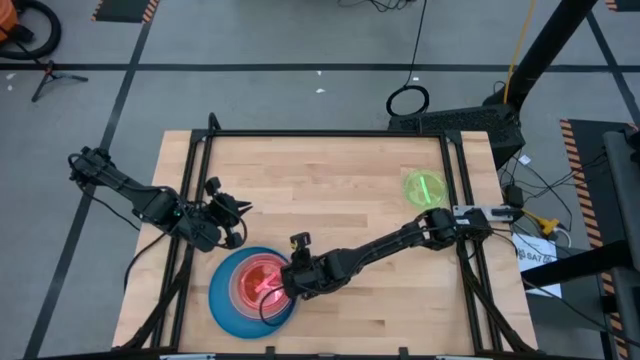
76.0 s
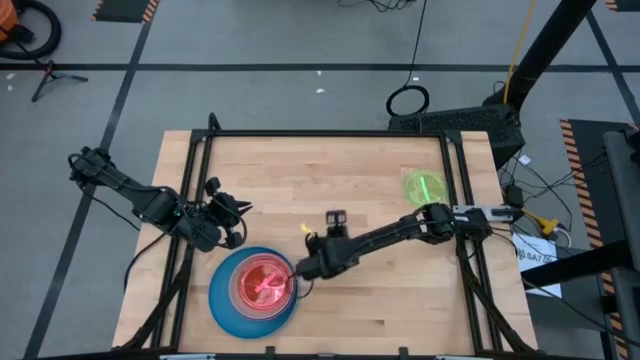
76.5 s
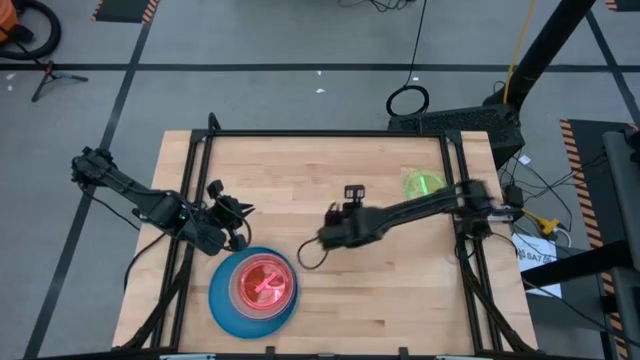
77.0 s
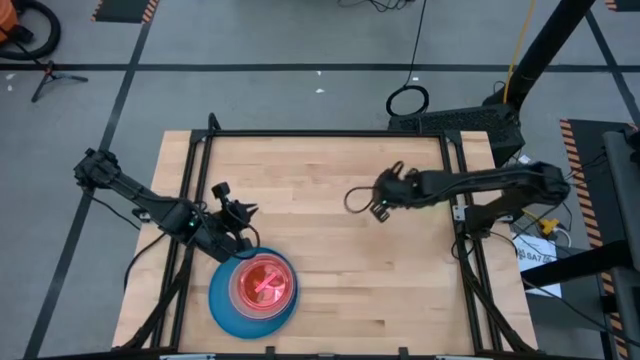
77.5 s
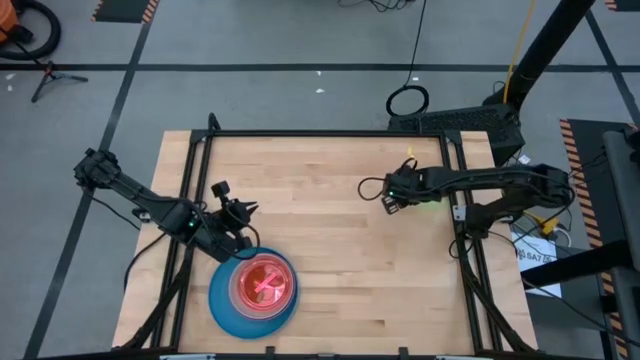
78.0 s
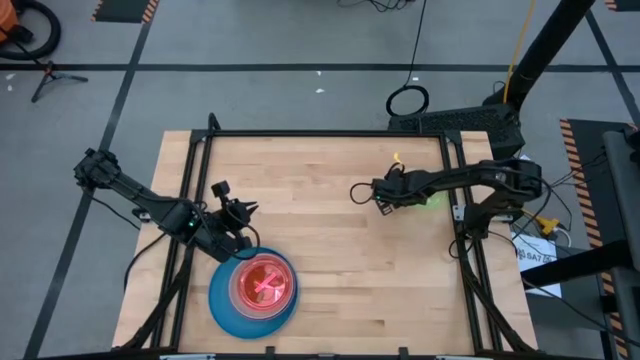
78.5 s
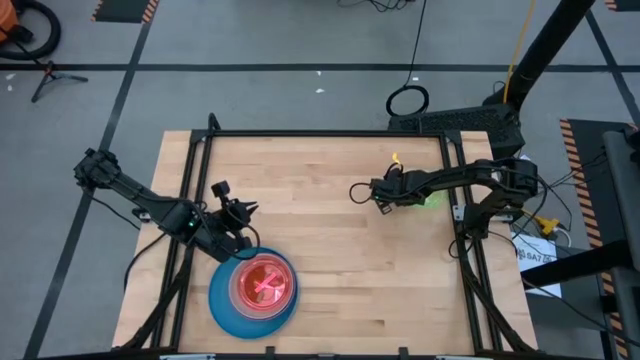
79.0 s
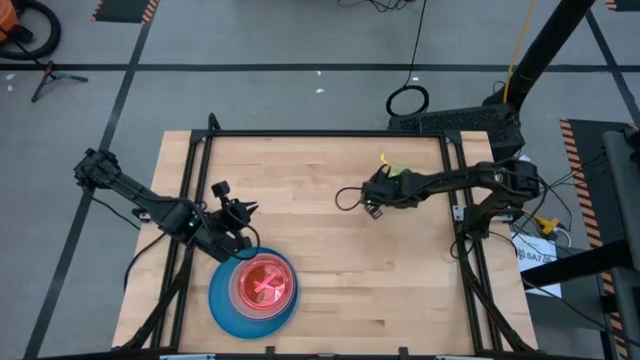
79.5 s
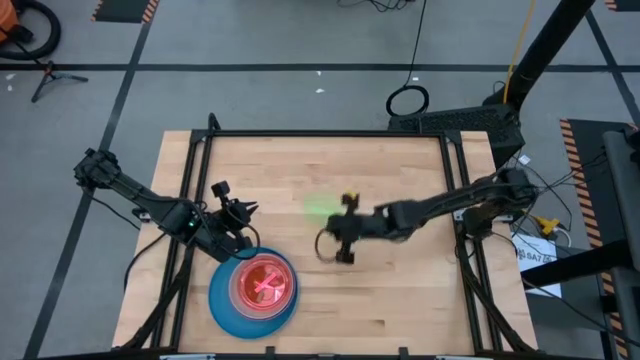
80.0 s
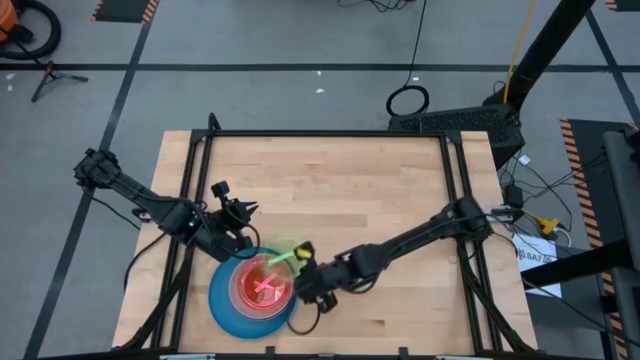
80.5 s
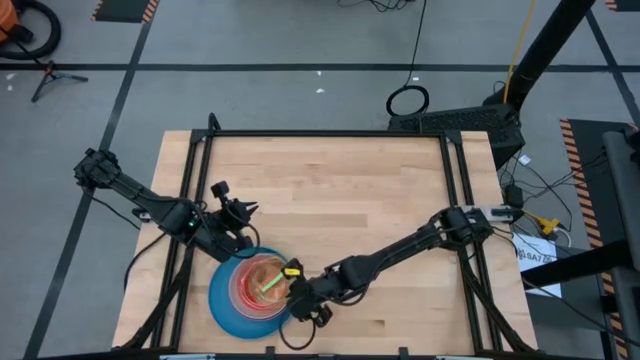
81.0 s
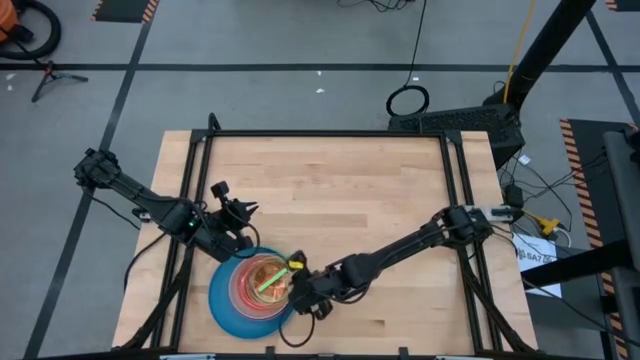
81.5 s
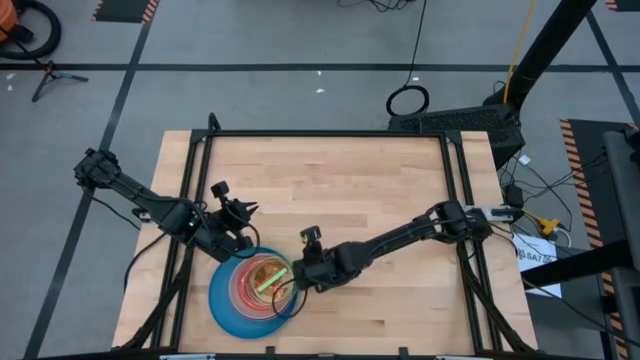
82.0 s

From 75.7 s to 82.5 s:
Task: Stack plastic plates
Stack the green plate on the pink plate

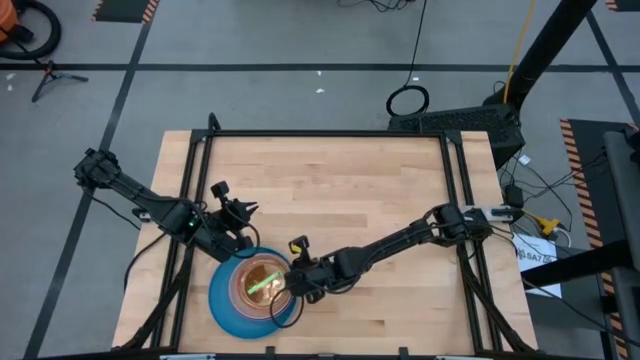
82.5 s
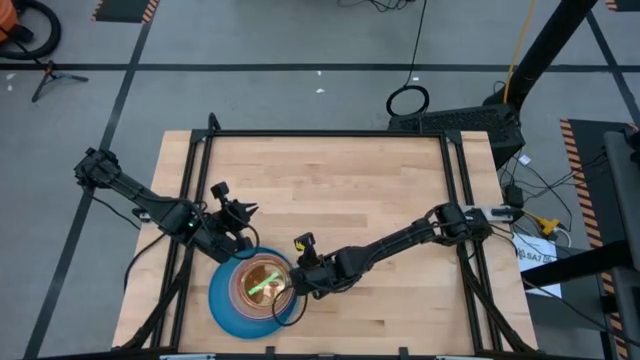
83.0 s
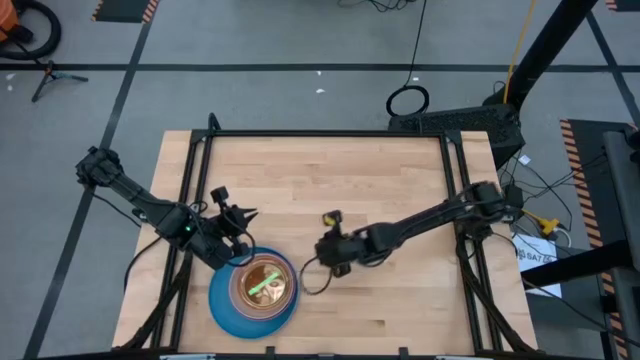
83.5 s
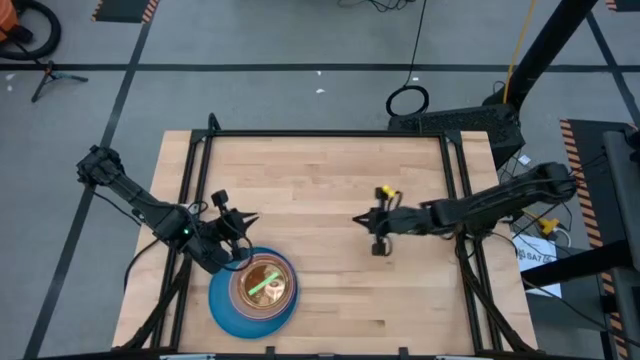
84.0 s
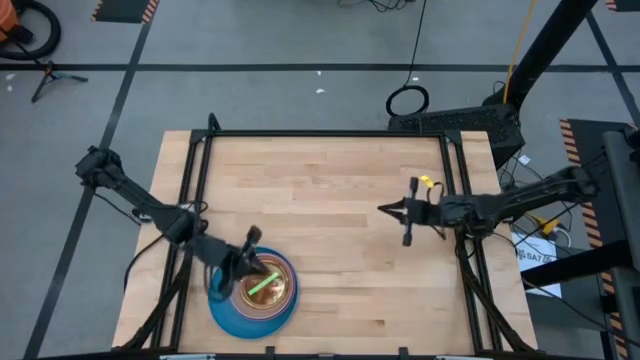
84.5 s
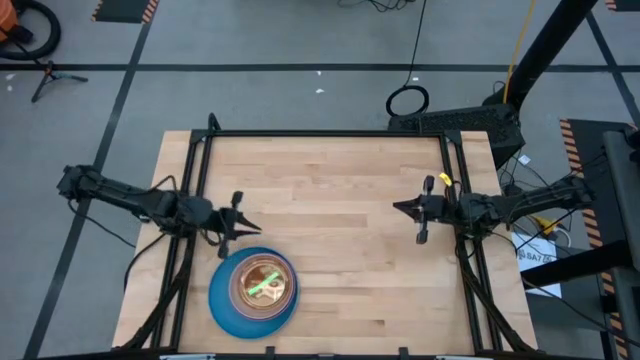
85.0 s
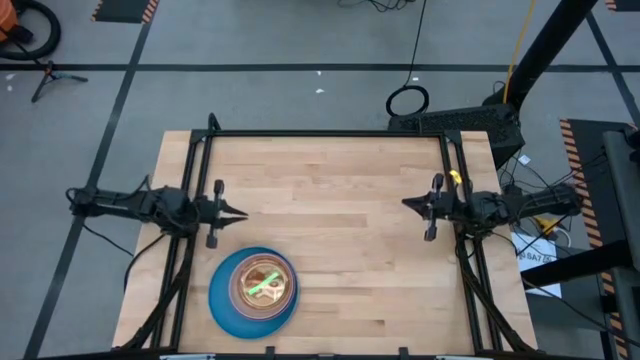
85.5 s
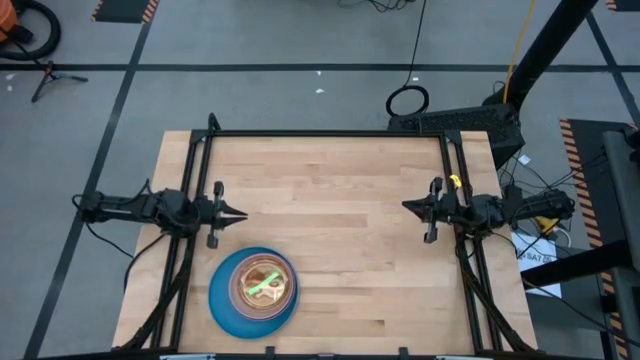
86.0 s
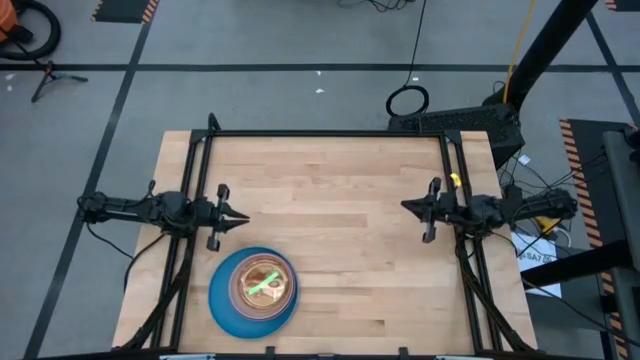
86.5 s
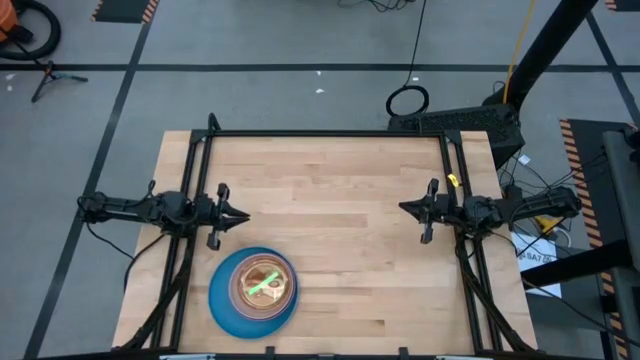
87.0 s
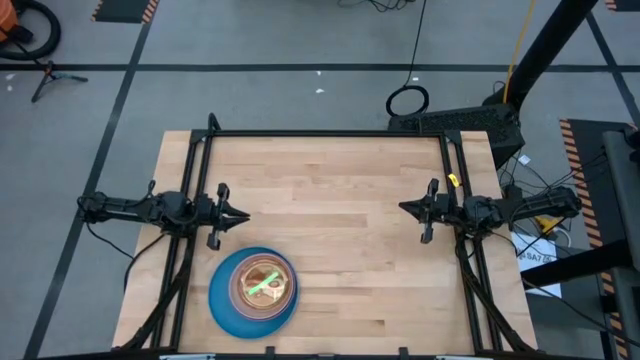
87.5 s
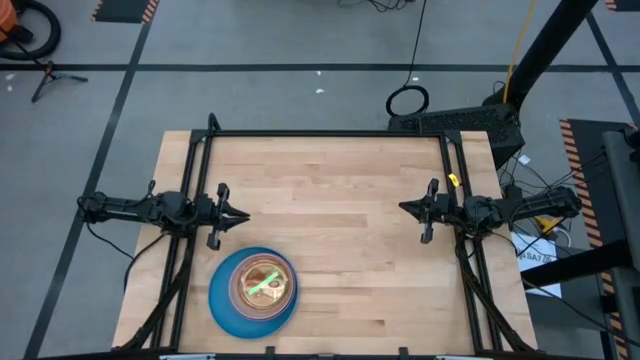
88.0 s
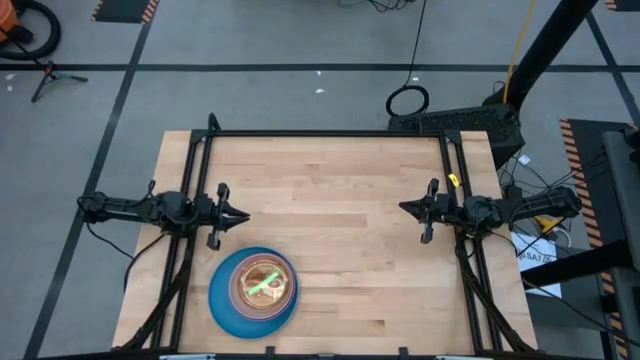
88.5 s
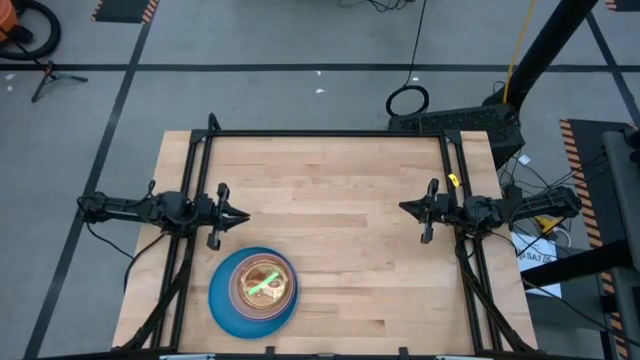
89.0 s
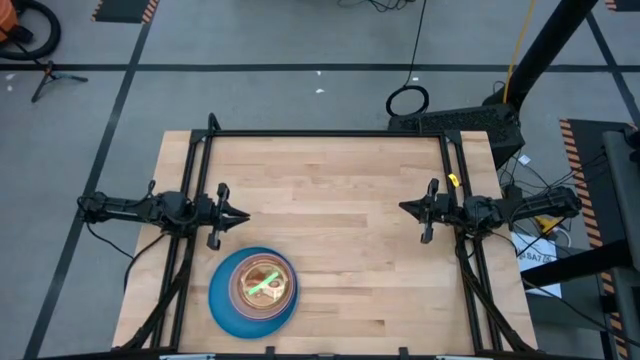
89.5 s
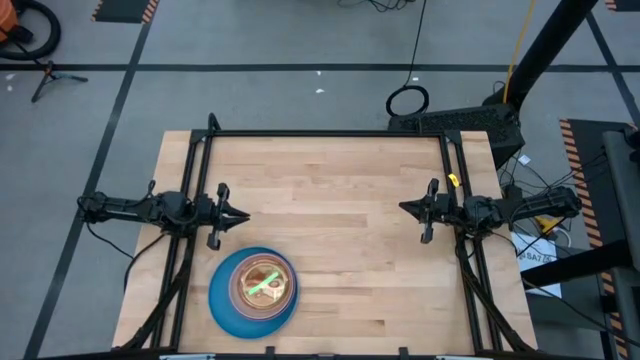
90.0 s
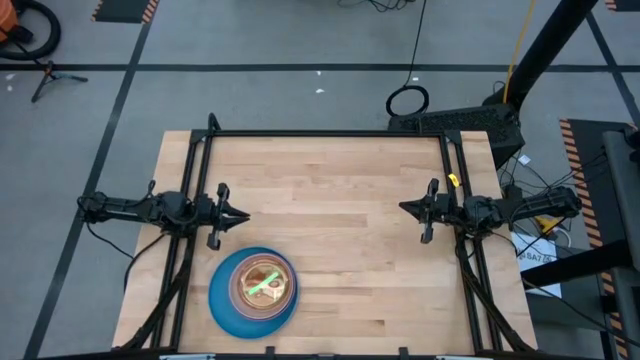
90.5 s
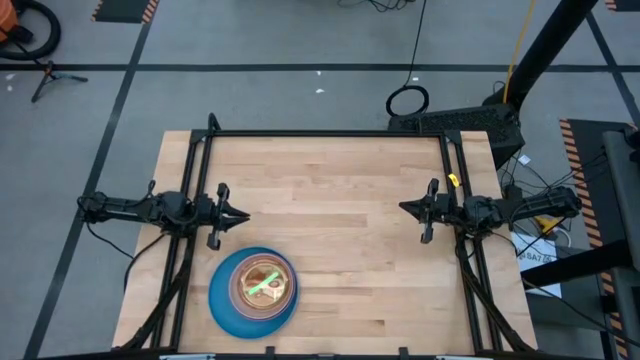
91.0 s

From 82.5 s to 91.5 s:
Return to Home Position

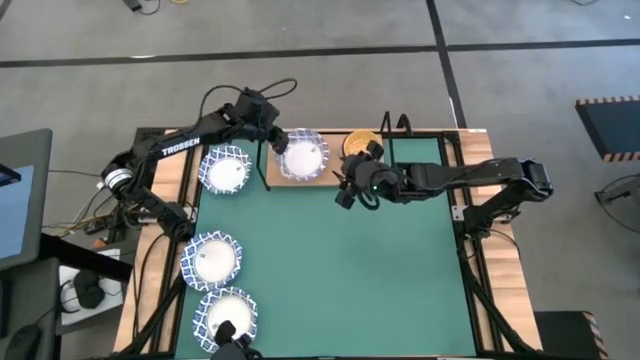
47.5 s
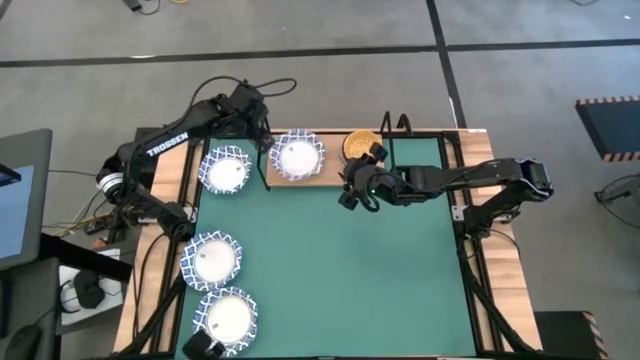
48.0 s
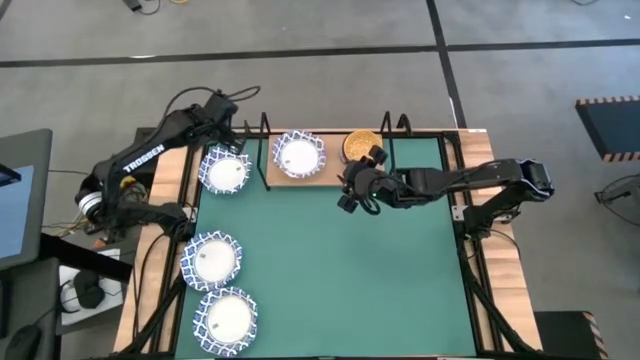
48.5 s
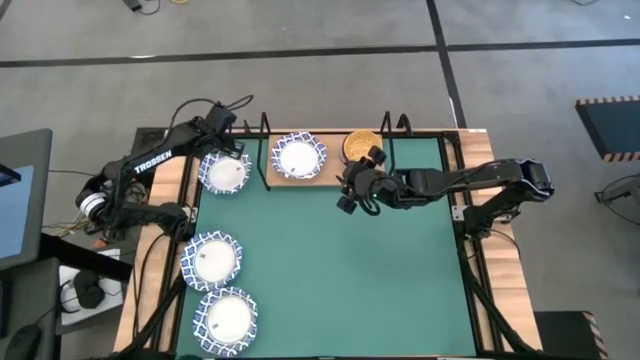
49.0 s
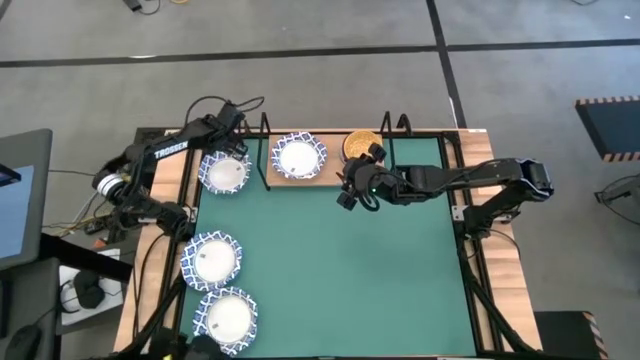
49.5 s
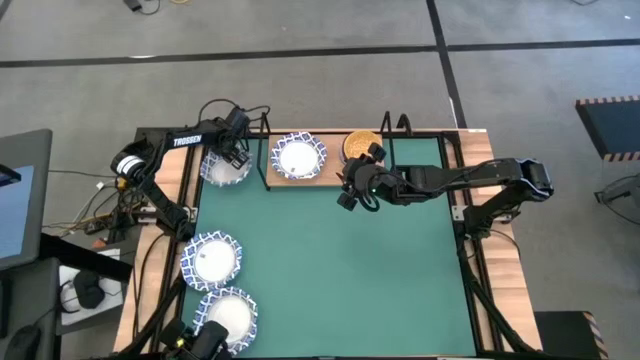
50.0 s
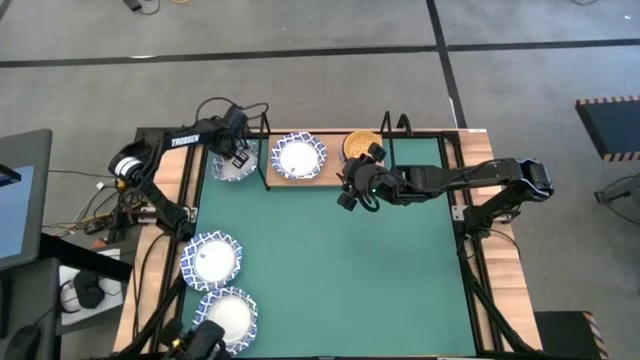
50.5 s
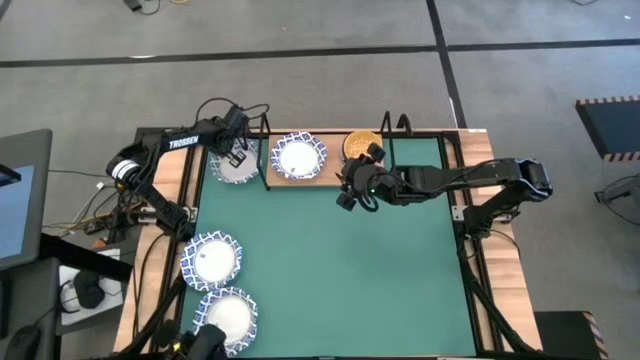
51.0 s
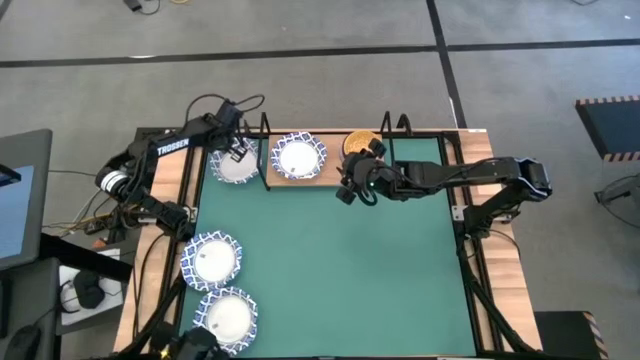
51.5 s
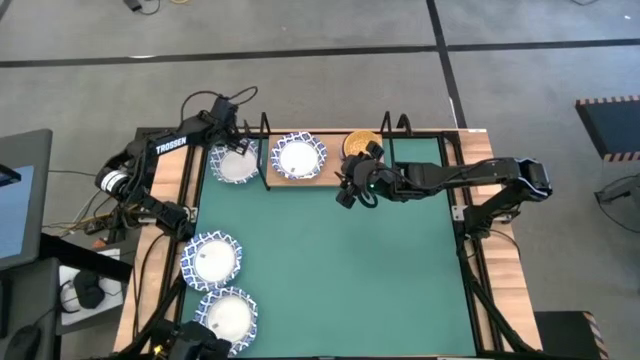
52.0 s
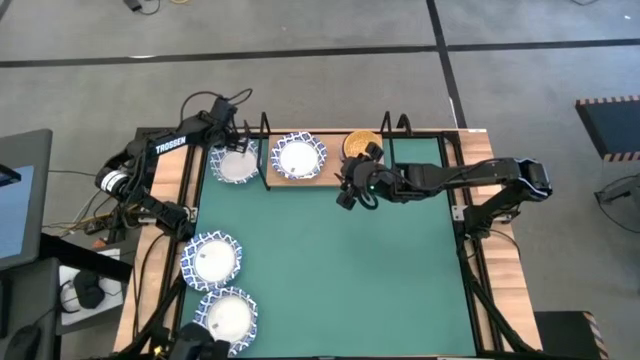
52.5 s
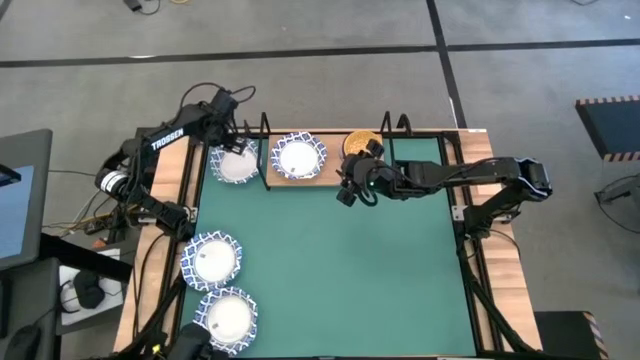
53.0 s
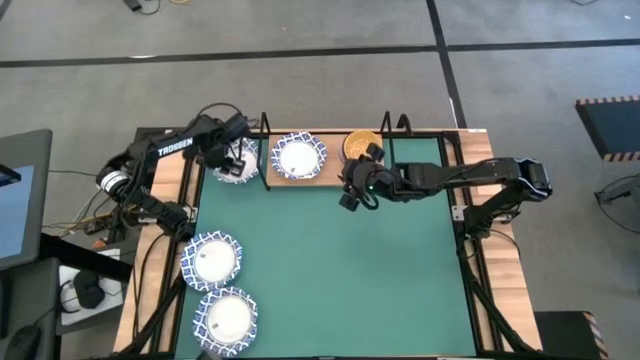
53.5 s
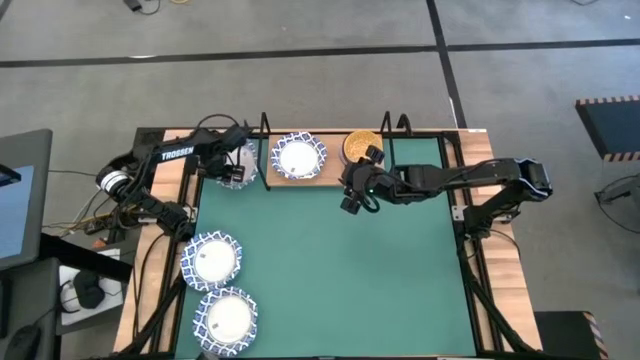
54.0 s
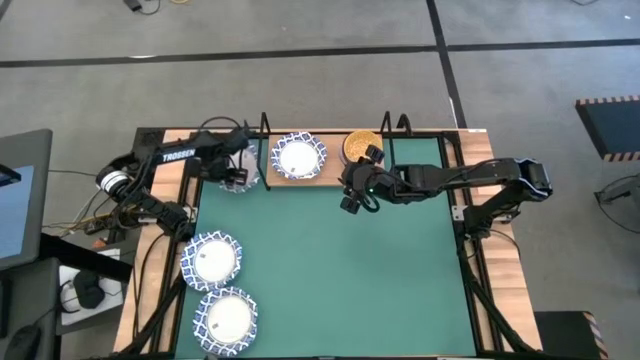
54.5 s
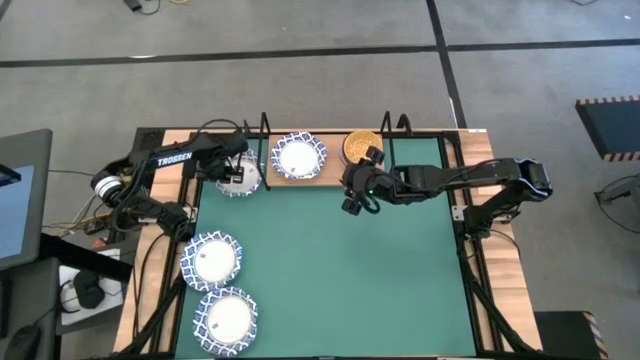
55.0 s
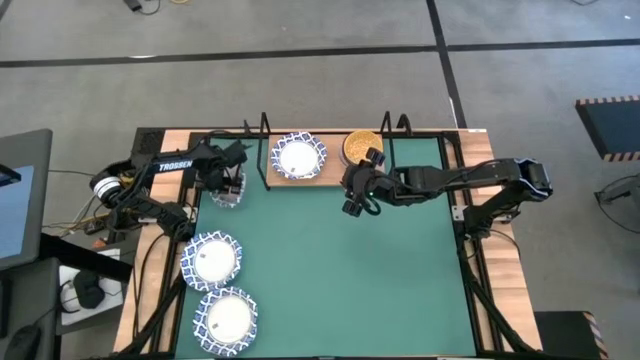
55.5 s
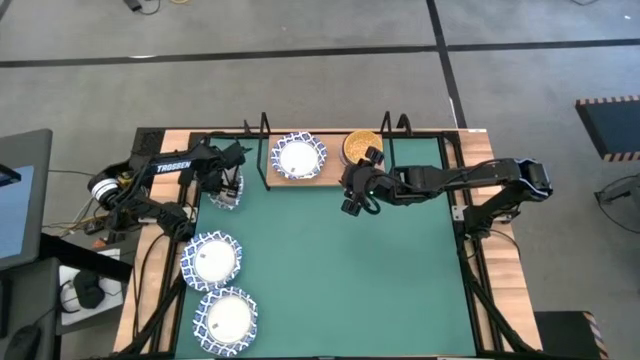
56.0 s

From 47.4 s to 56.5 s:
Task: Place and stack bowls onto a shelf
Stack the white patterned bowl on top of the white patterned bowl on the shelf
